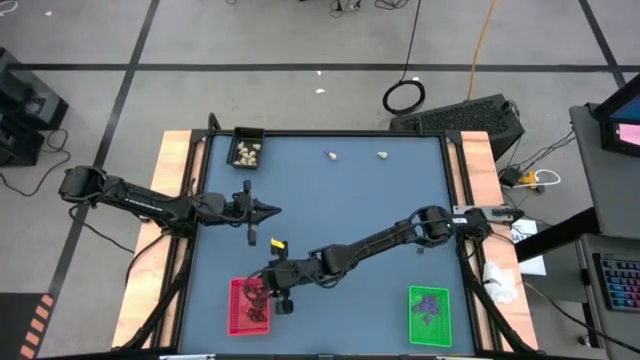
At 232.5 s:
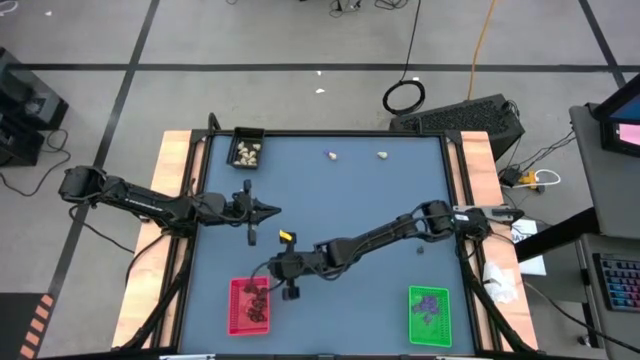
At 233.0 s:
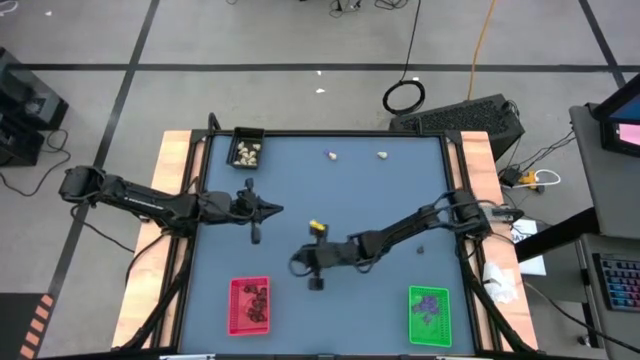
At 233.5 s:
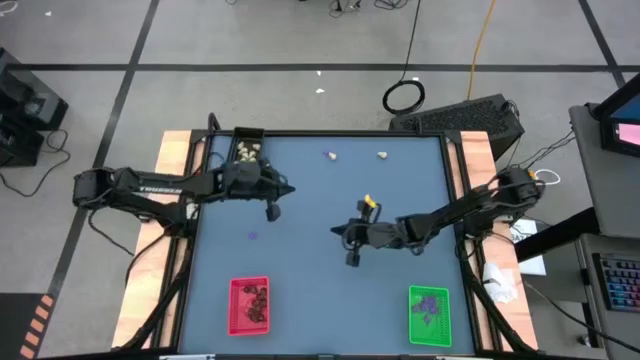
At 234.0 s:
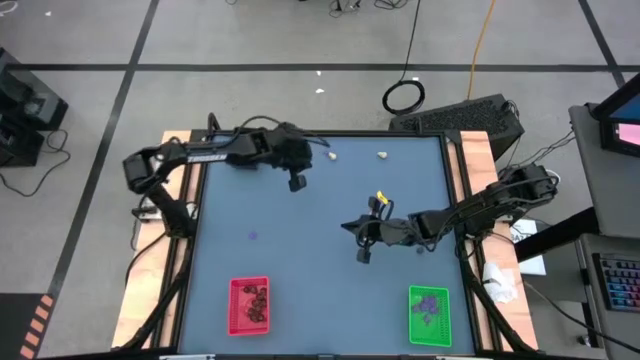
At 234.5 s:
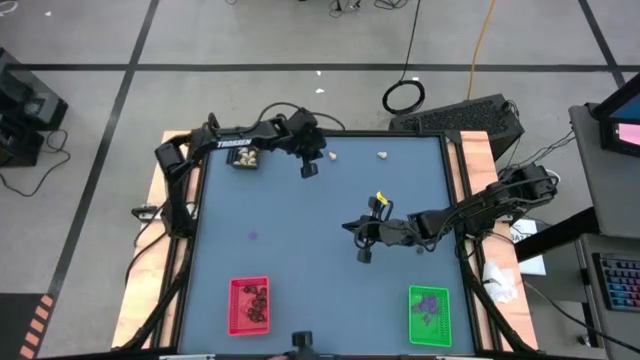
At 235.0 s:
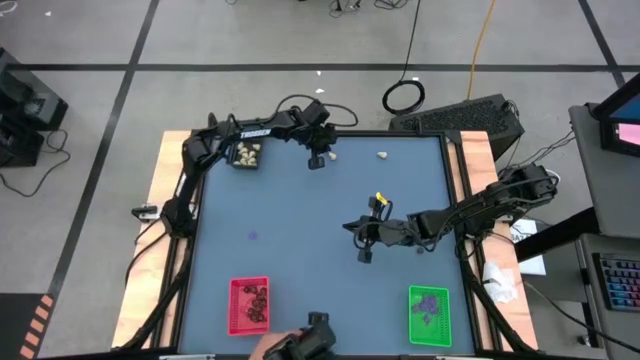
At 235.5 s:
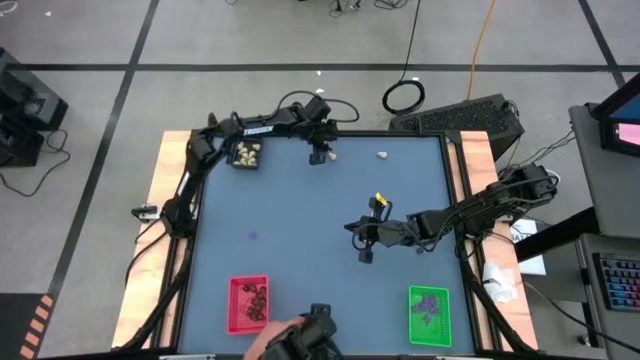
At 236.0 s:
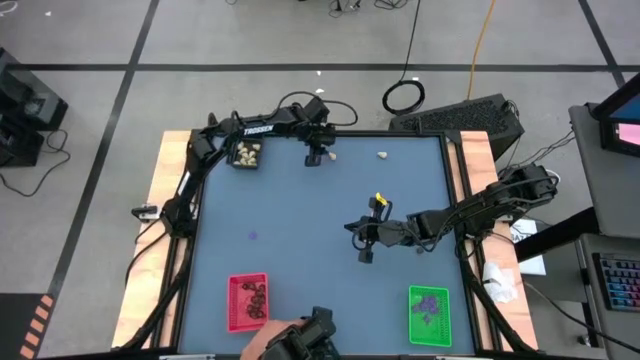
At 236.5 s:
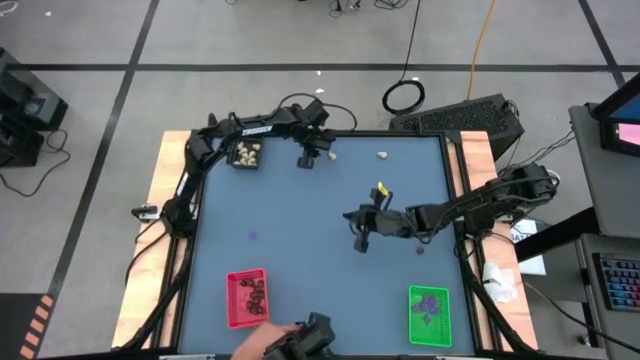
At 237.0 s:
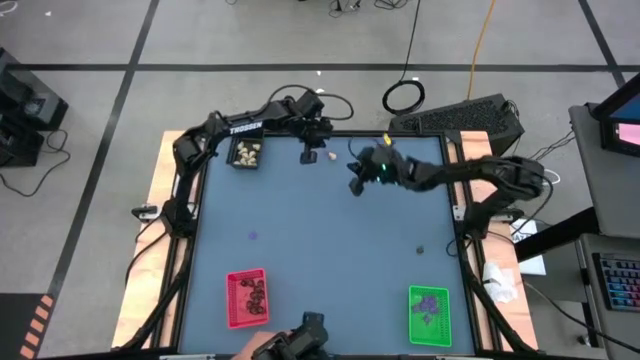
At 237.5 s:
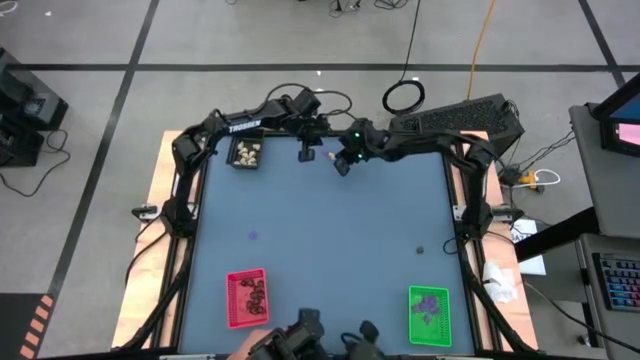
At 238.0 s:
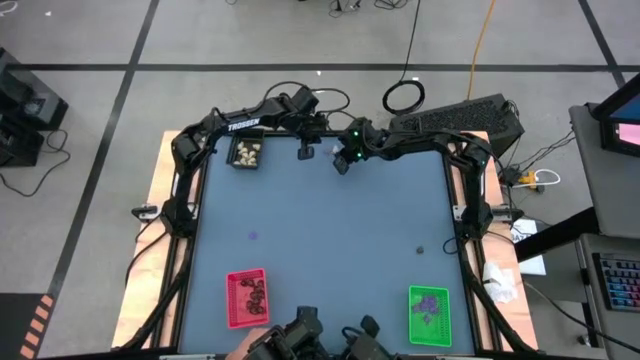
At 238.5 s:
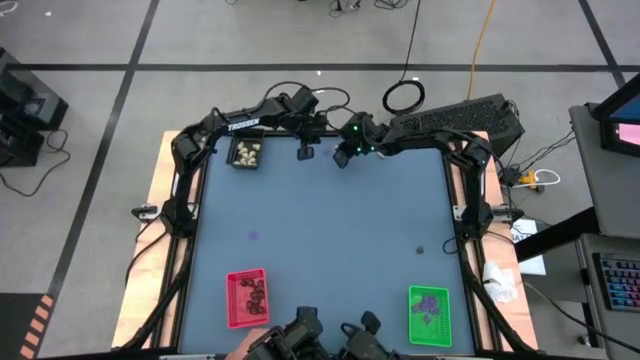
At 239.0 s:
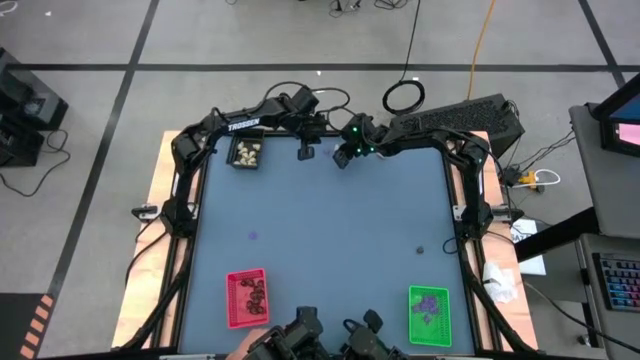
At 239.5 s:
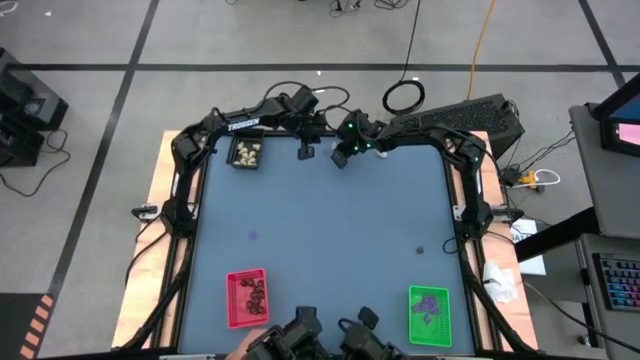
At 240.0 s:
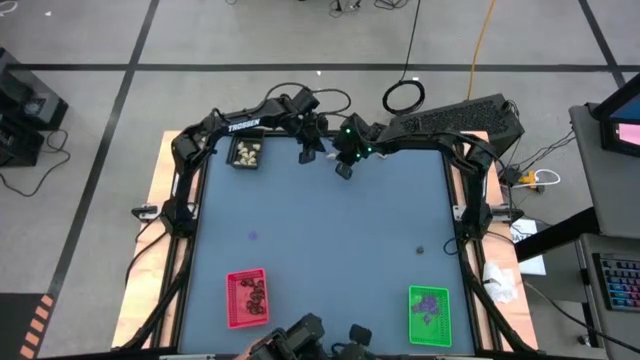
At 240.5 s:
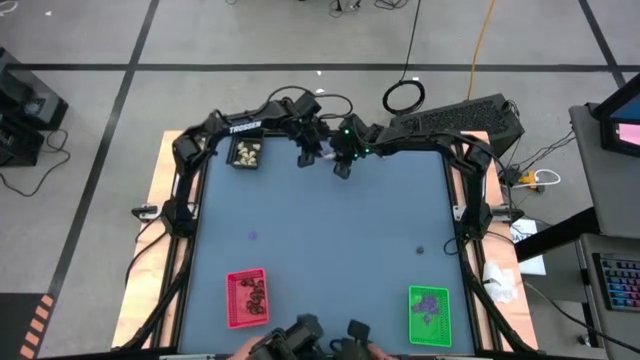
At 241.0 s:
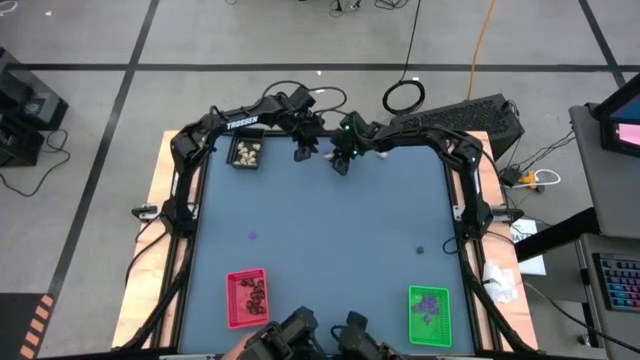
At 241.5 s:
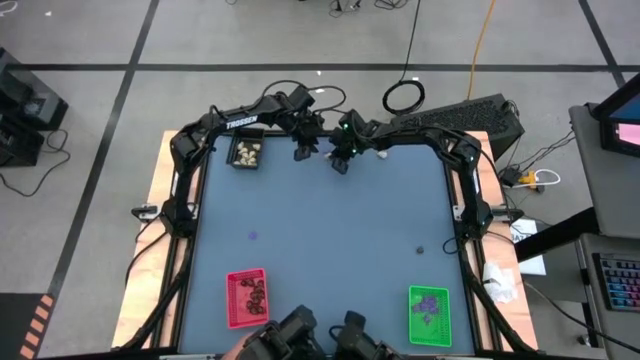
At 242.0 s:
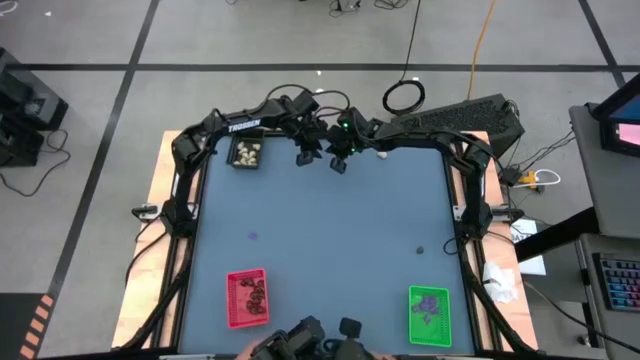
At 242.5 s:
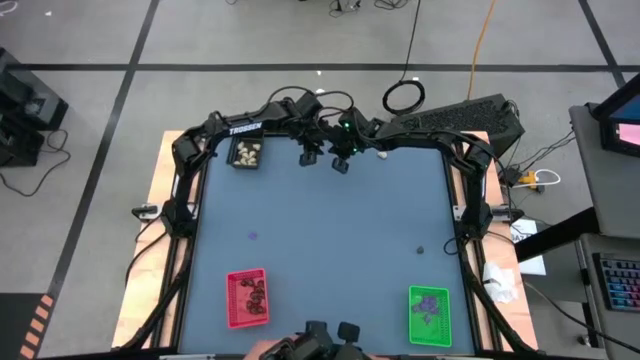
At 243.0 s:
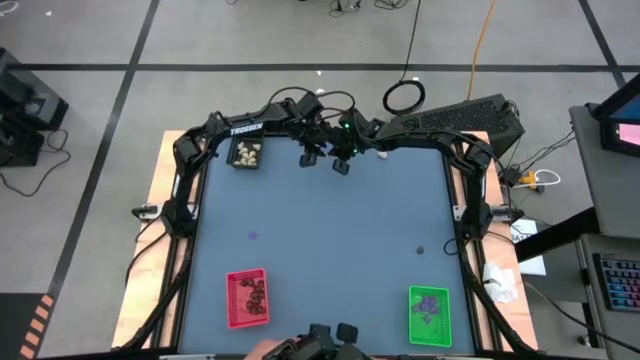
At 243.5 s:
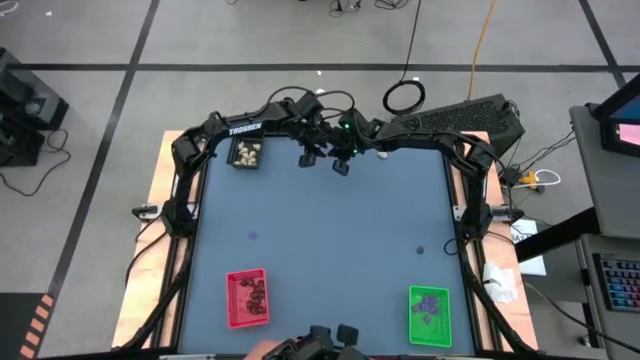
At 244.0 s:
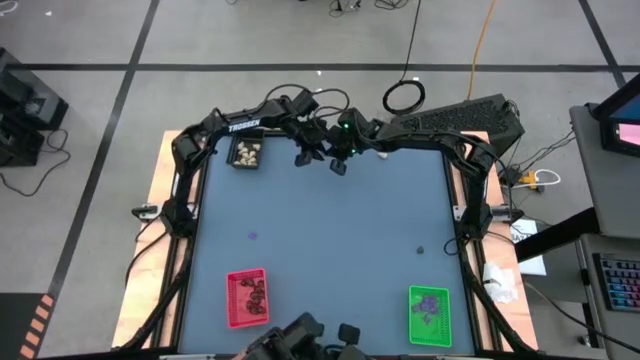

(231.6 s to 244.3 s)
Task: Sort Halloween decoration
Put the white skull toy into the black basket

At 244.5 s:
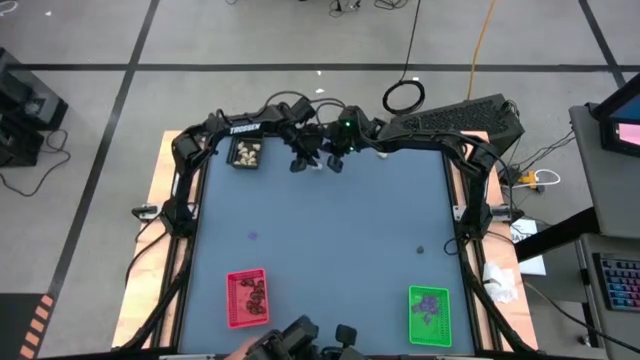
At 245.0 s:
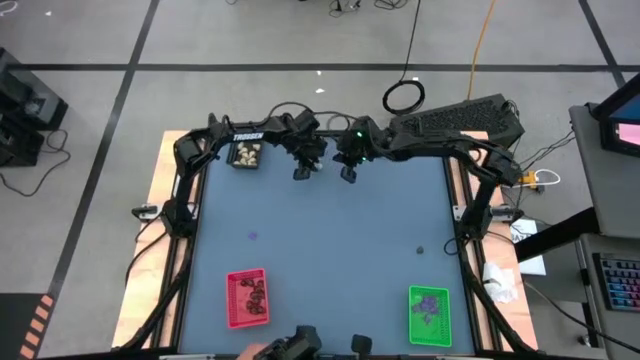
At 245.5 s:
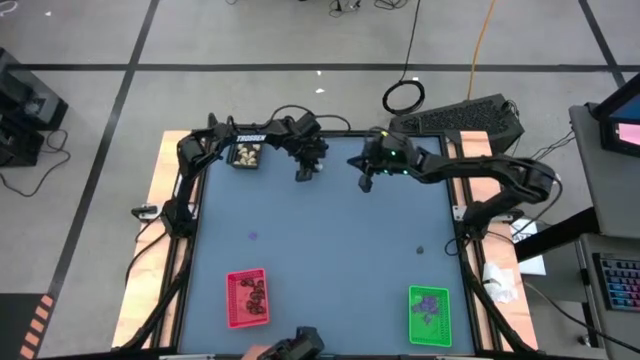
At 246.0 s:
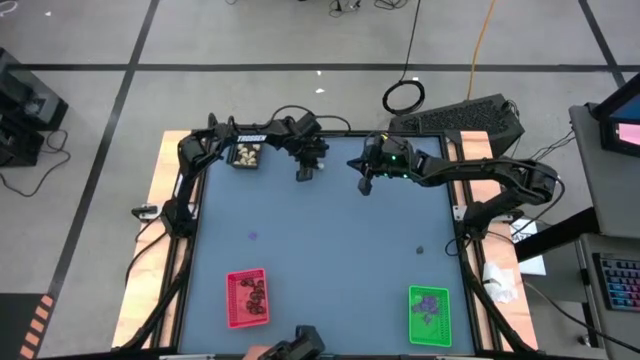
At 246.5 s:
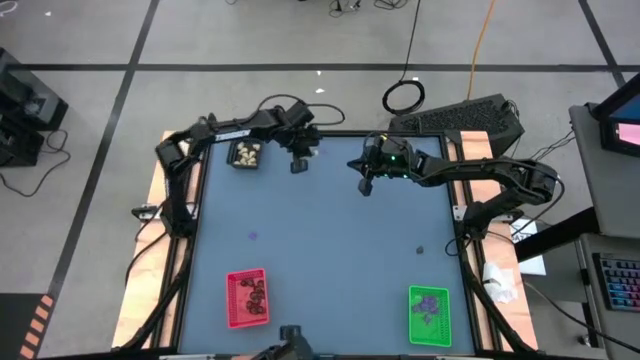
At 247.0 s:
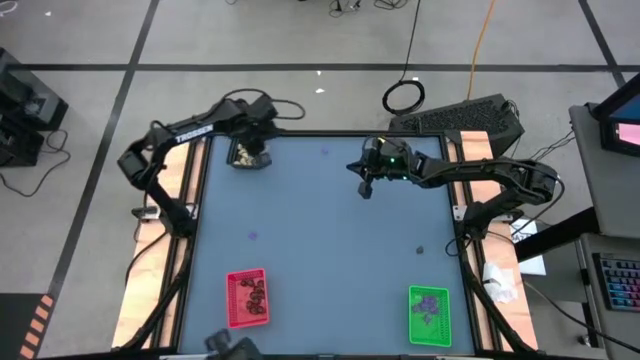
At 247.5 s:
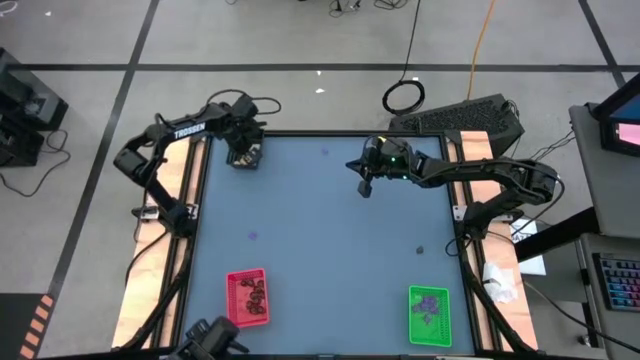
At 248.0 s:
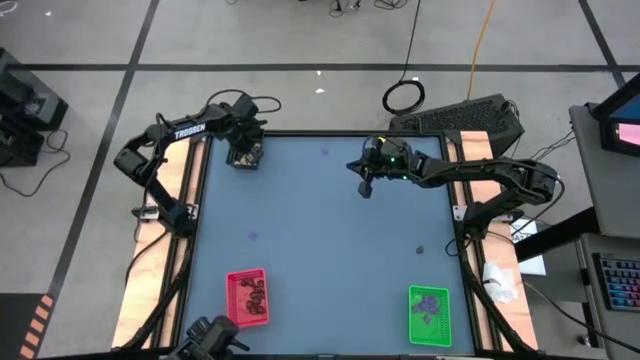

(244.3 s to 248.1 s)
Put the white skull toy into the black bin

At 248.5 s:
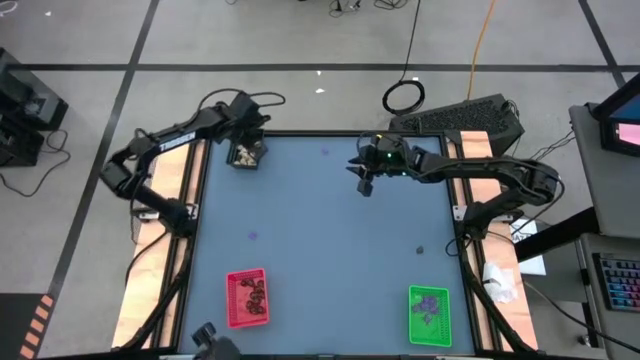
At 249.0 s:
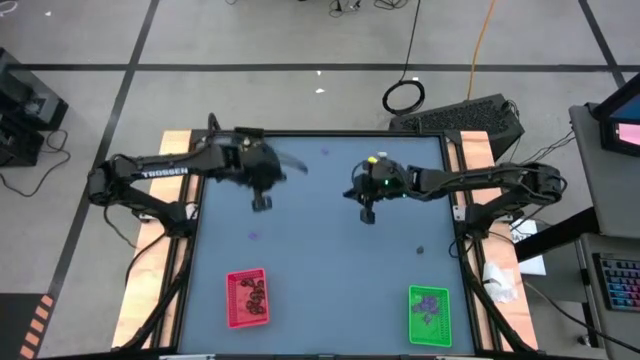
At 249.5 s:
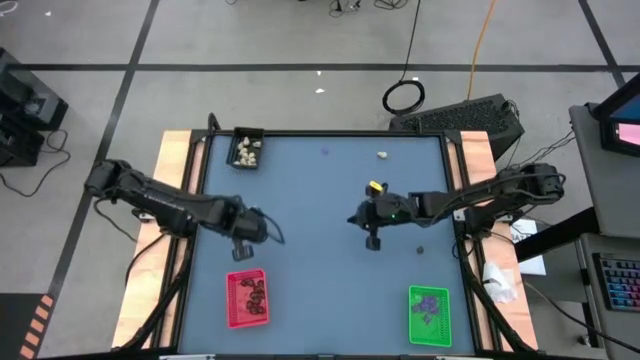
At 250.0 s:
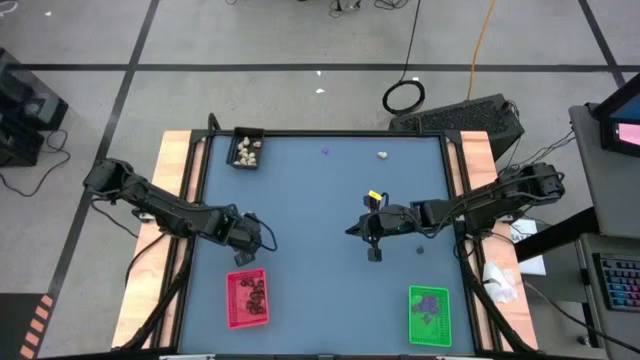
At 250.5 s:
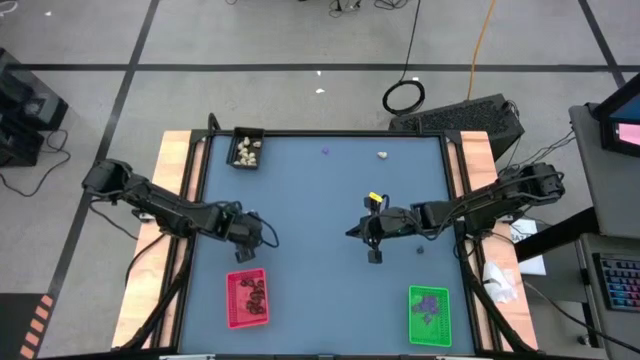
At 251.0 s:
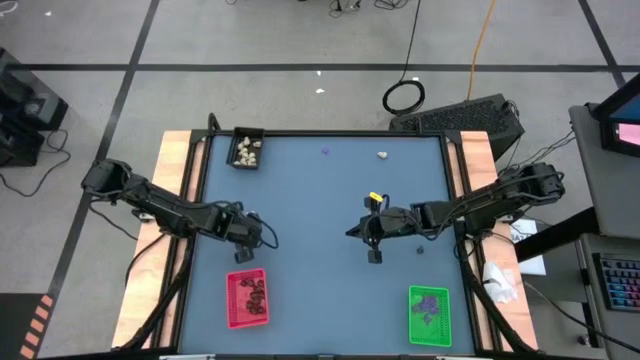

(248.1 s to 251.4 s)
Put the violet spider toy into the green bin

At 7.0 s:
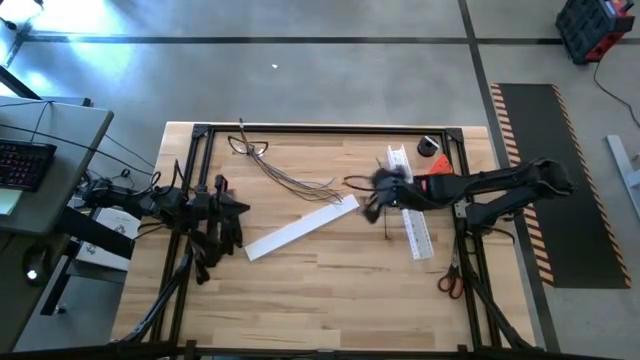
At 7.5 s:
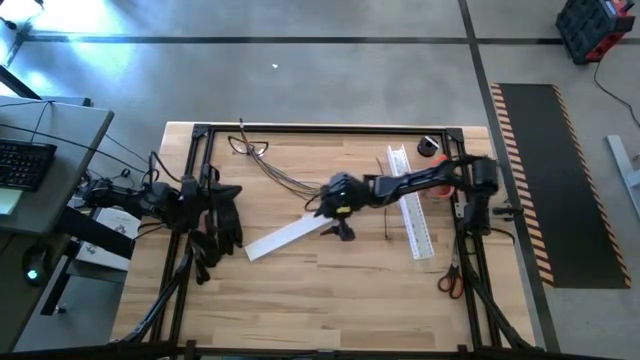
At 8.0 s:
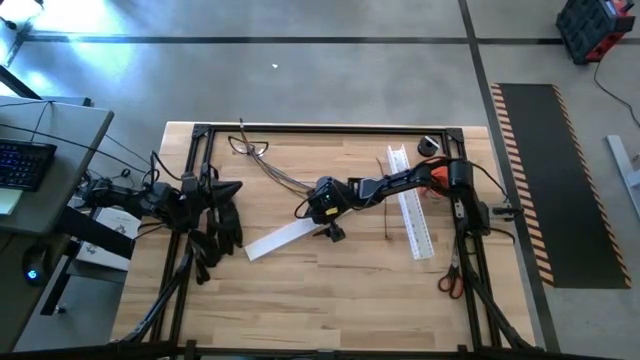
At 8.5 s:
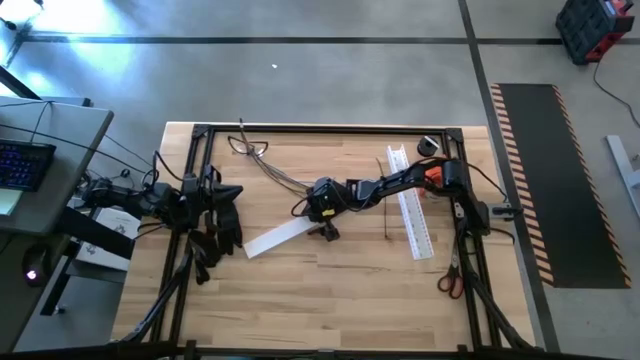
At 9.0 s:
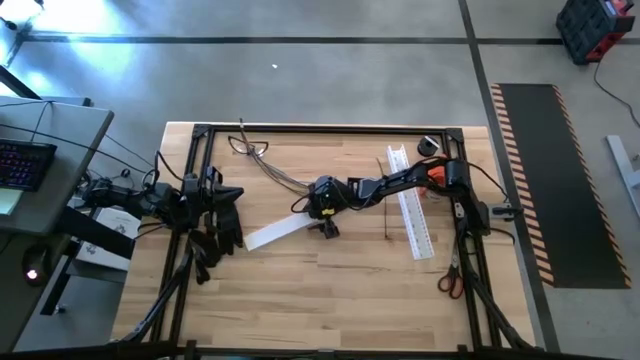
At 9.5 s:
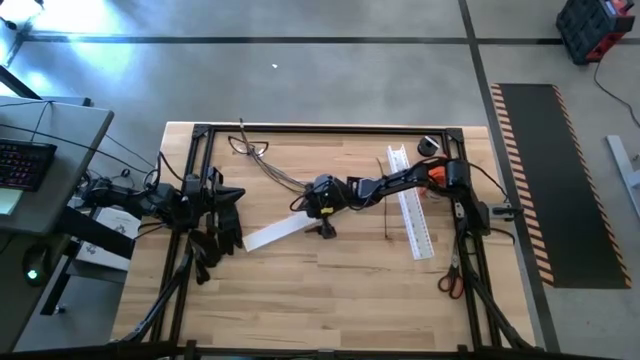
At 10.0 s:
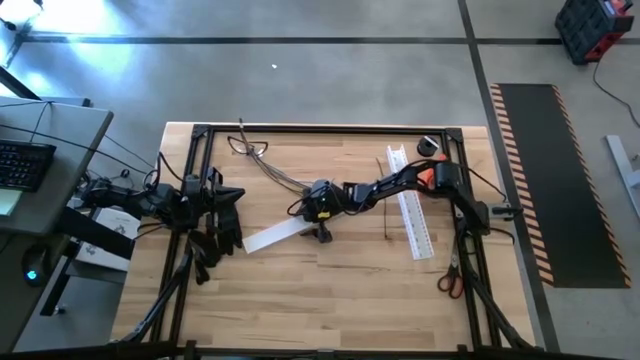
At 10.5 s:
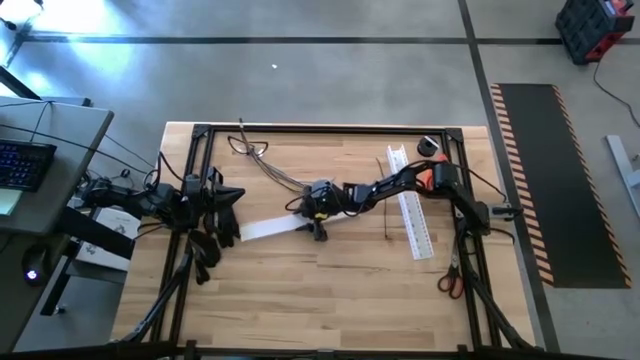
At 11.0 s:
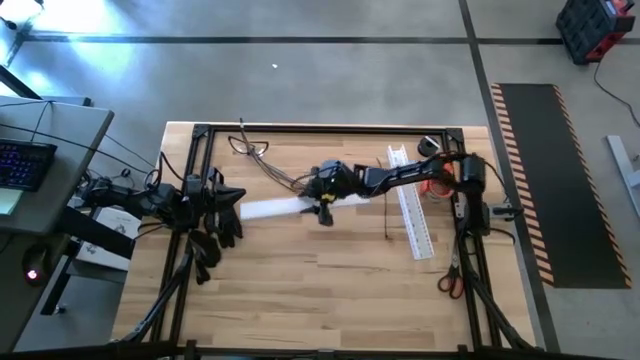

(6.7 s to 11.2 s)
Task: Ziptie cables
Move the cable duct cover from the center to the table to the top center part of the table
